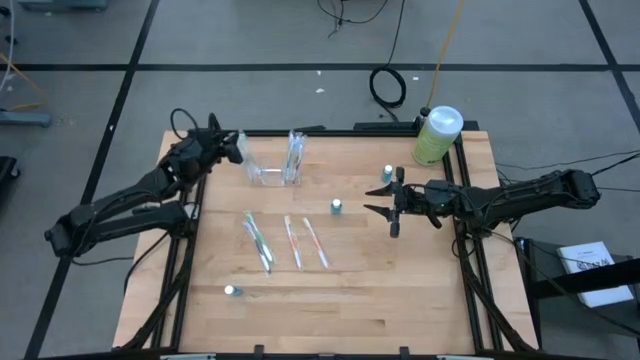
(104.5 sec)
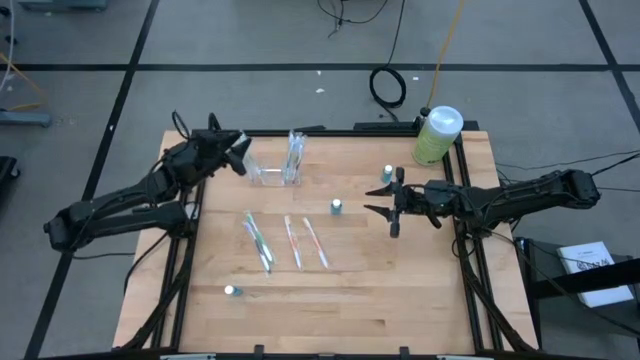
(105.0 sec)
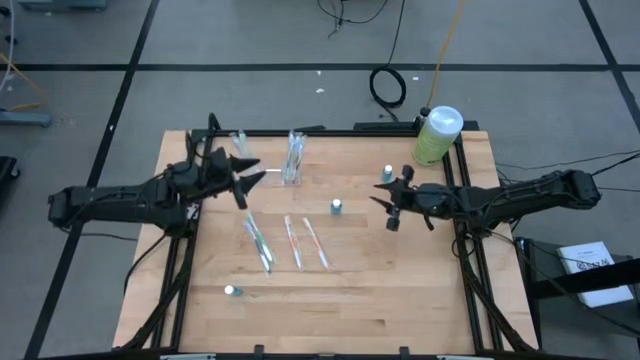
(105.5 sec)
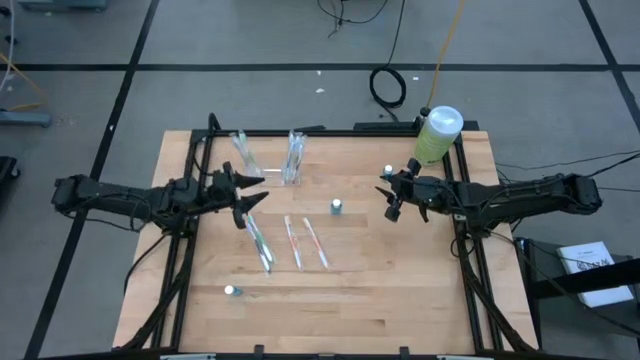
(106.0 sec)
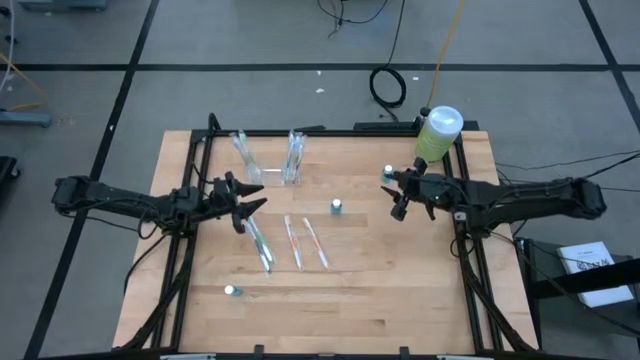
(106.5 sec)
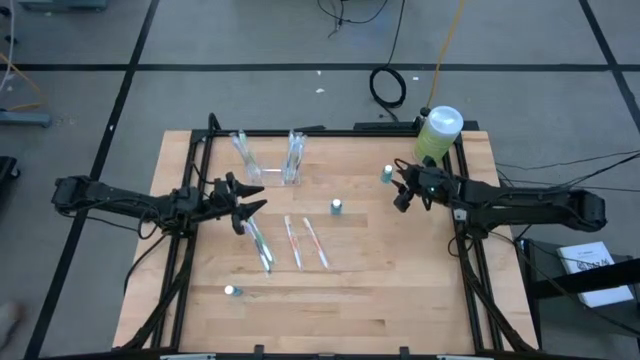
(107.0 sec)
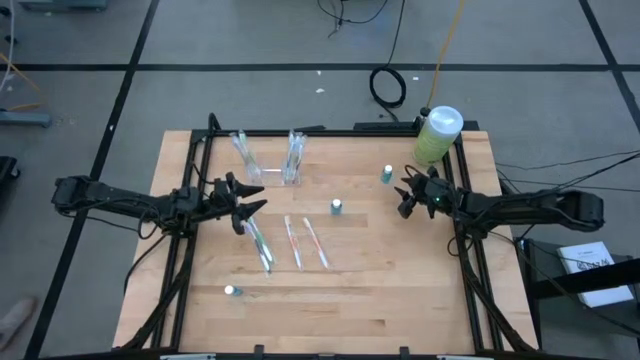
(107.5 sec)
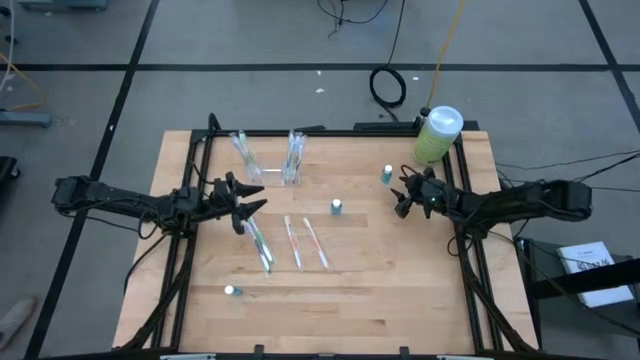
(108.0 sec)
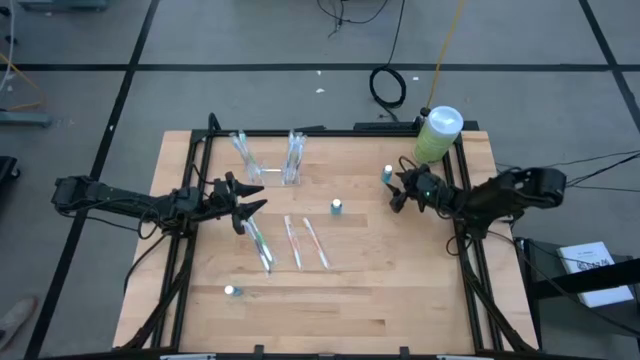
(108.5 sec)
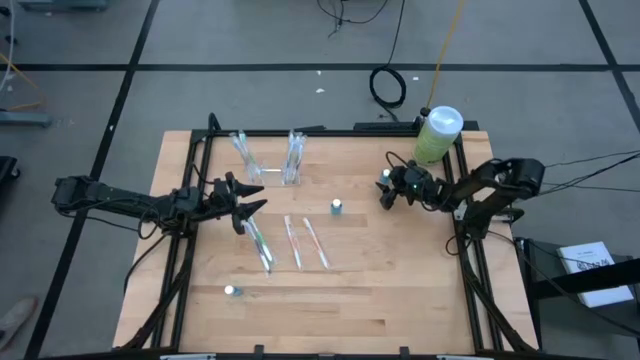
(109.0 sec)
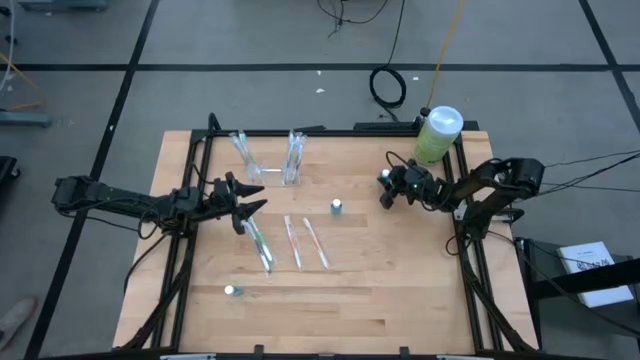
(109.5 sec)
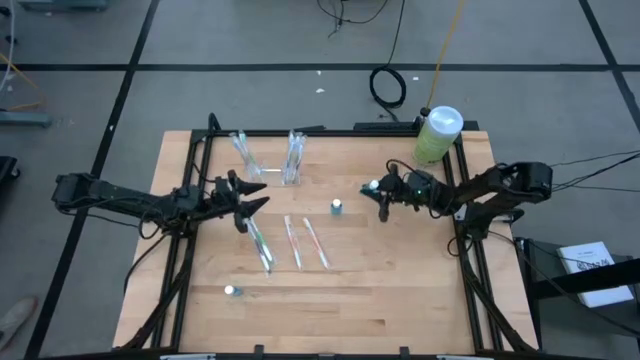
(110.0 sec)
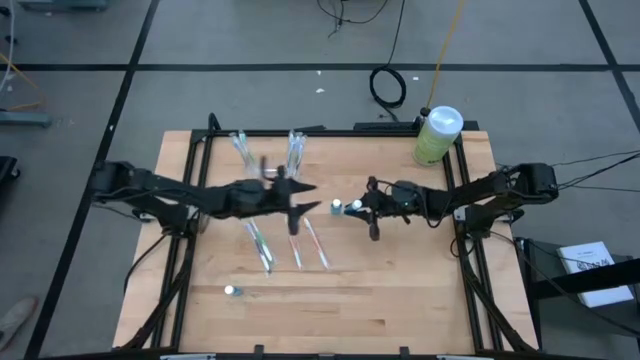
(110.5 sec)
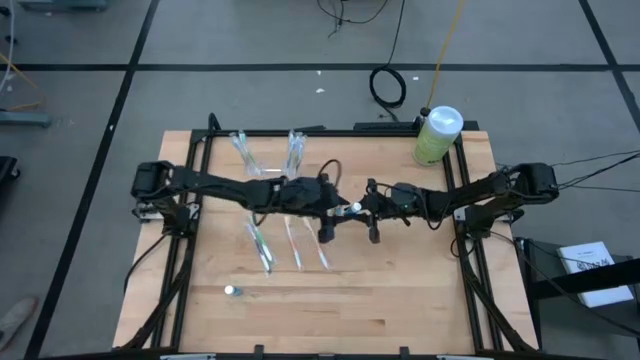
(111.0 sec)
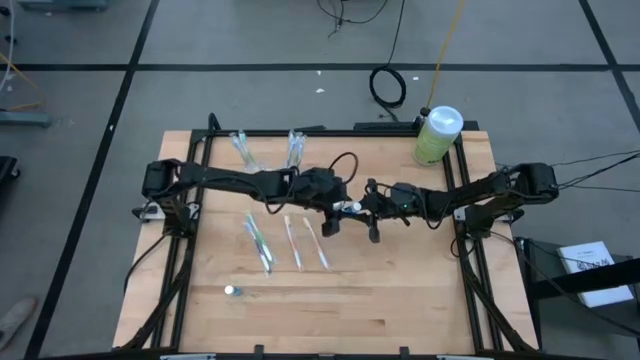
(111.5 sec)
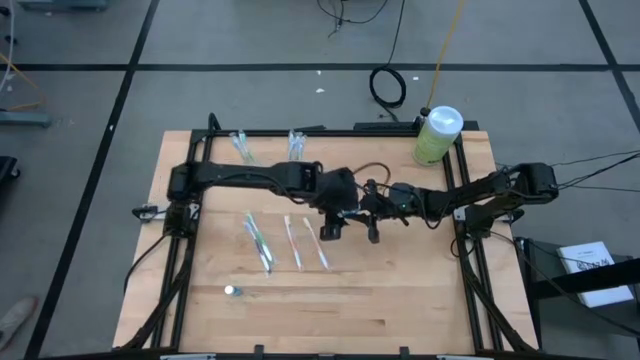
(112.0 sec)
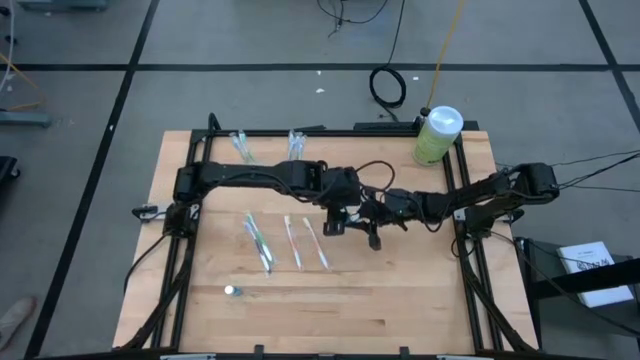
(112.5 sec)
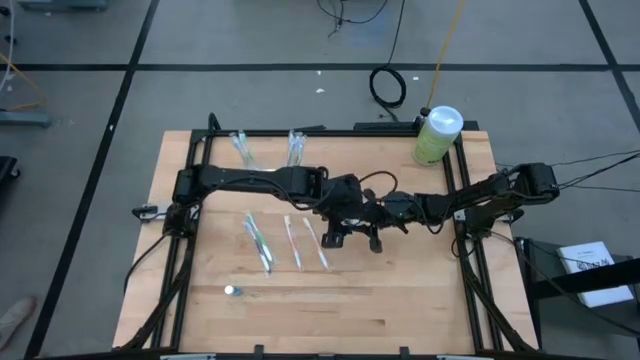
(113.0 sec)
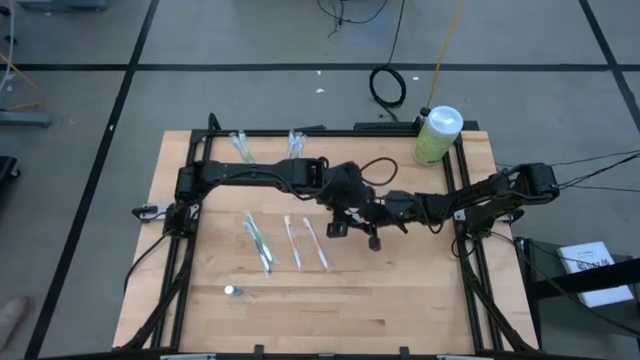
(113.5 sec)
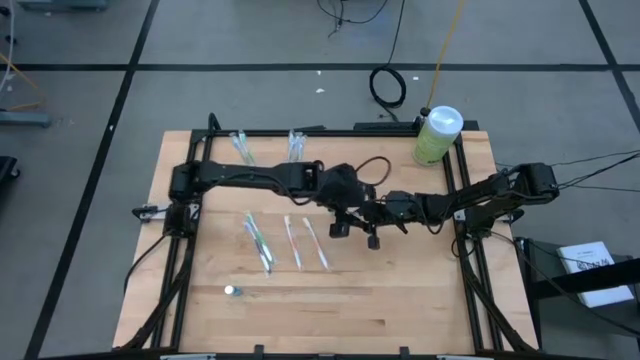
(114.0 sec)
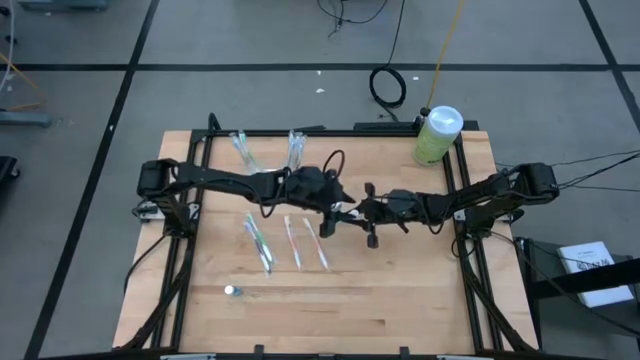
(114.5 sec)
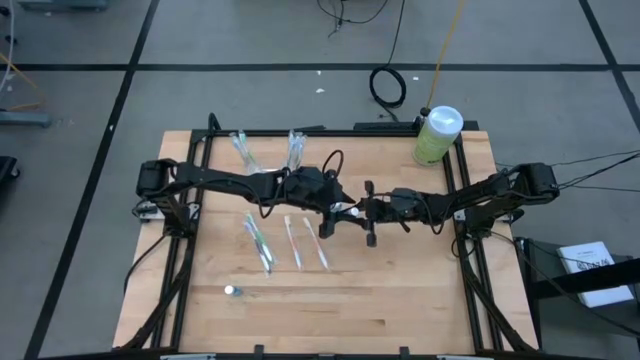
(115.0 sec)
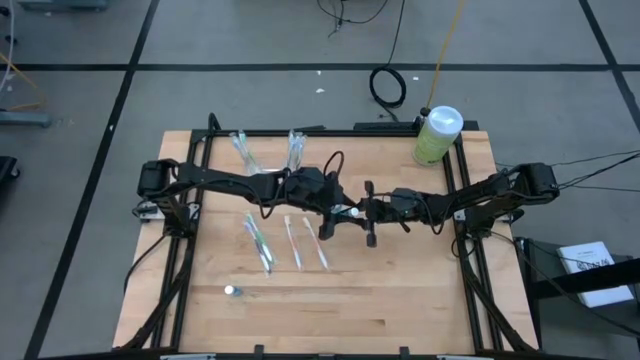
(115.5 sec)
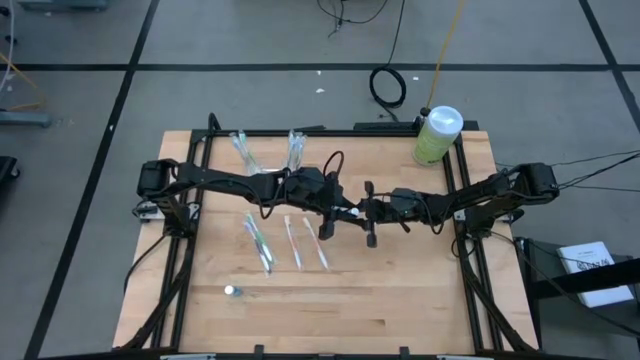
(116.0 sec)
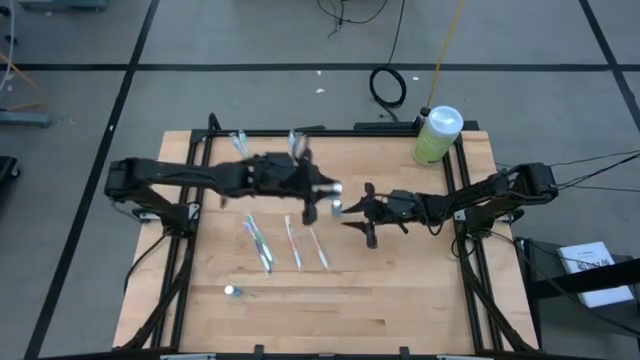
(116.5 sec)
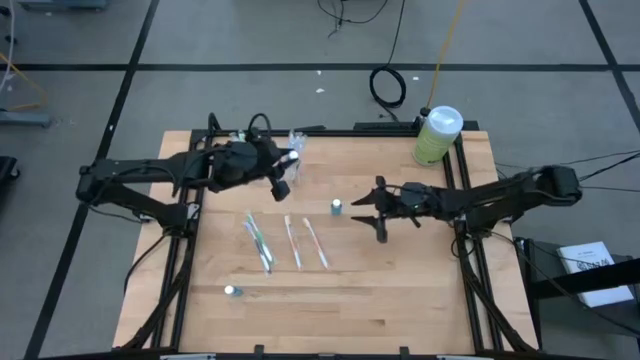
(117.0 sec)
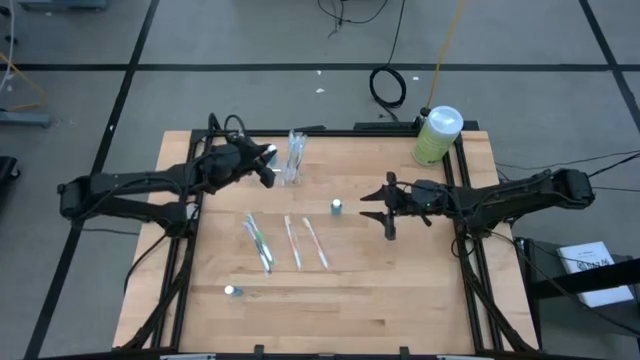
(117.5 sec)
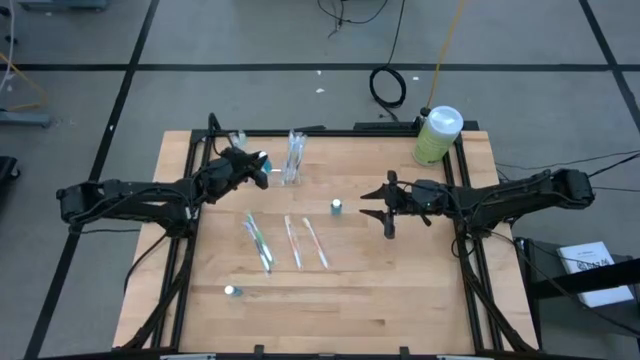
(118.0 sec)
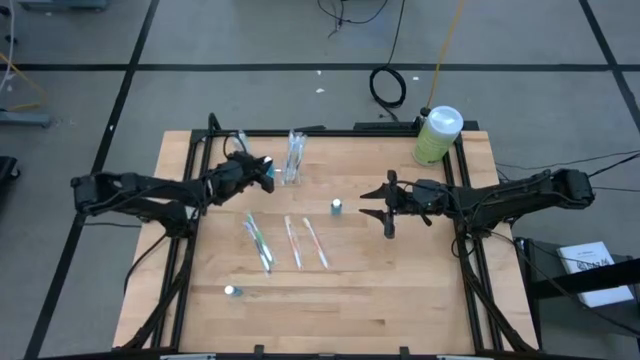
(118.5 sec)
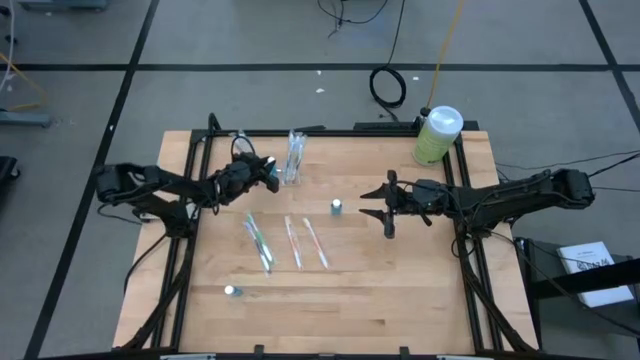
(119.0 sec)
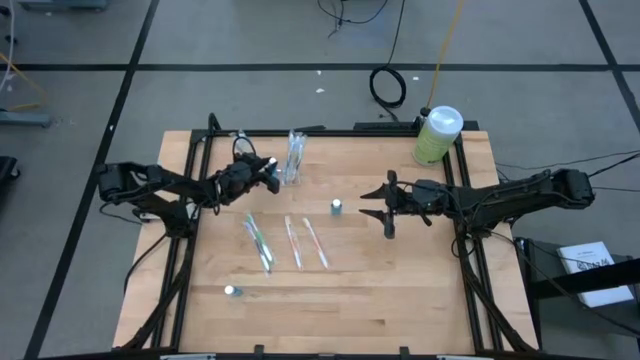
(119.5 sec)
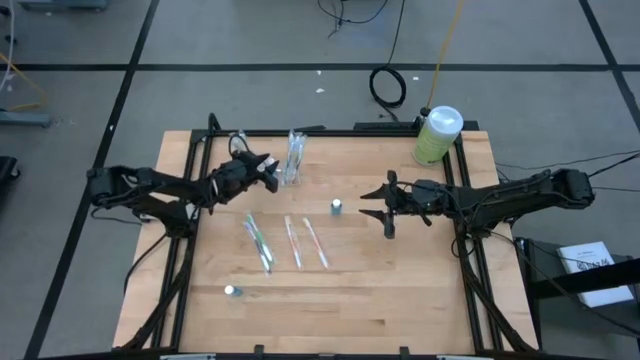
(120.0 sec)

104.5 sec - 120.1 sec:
Task: Pick & Place toothbrushing station
Put the blue mouthwash into the transparent organizer

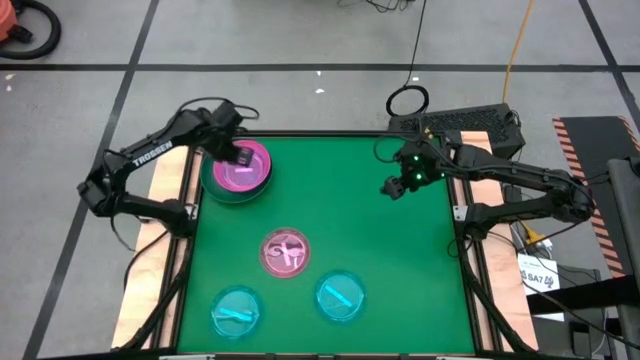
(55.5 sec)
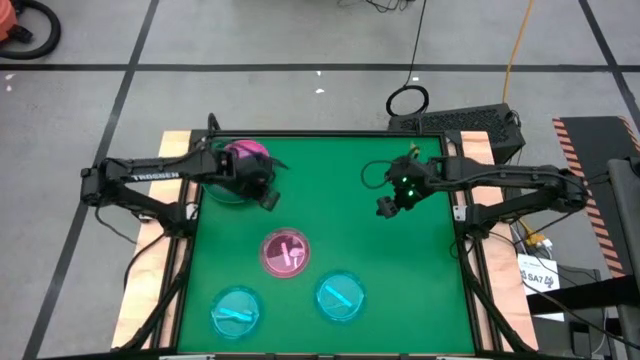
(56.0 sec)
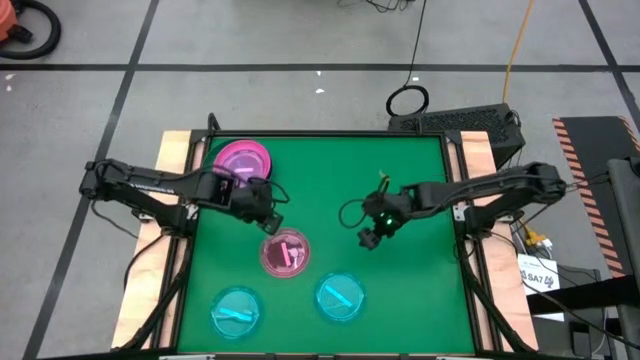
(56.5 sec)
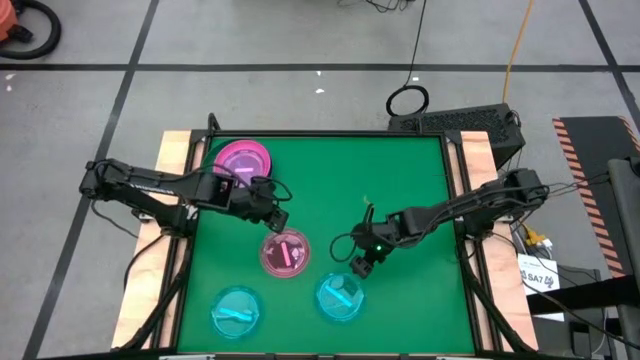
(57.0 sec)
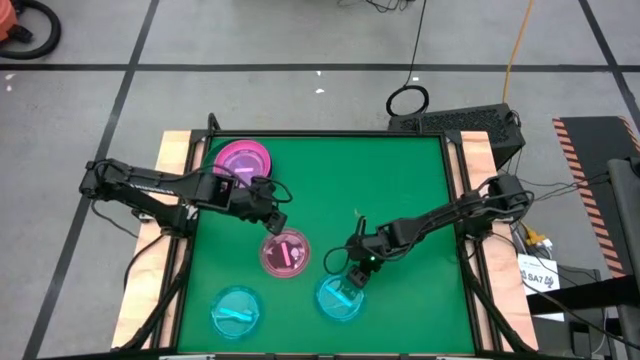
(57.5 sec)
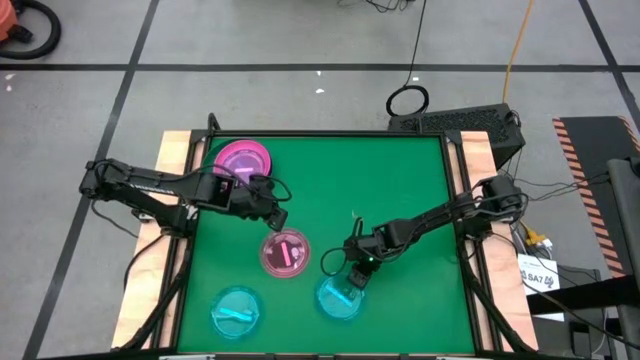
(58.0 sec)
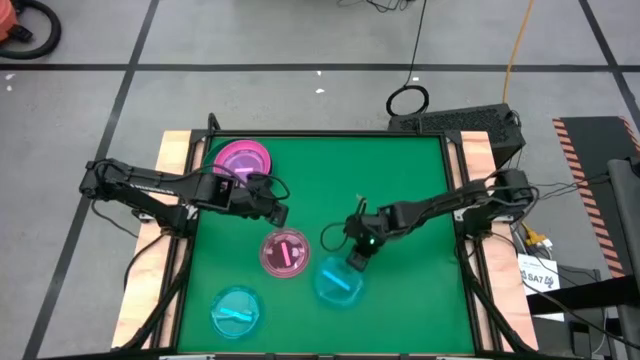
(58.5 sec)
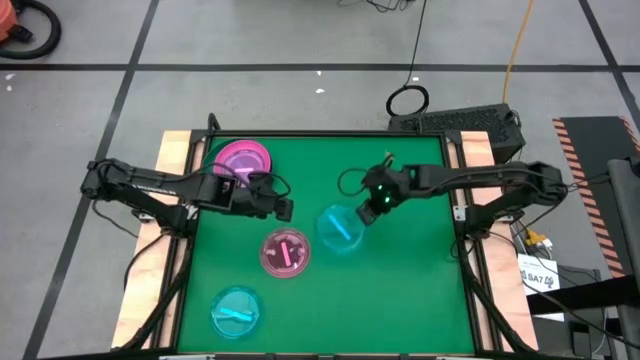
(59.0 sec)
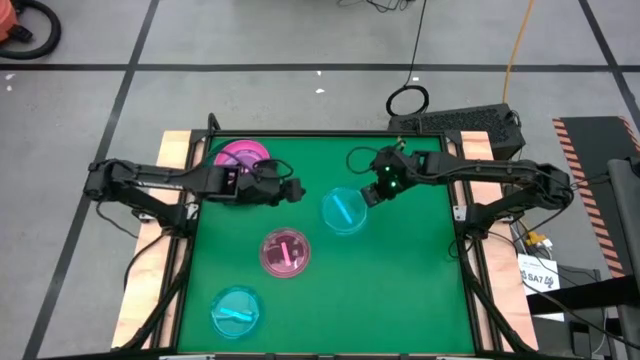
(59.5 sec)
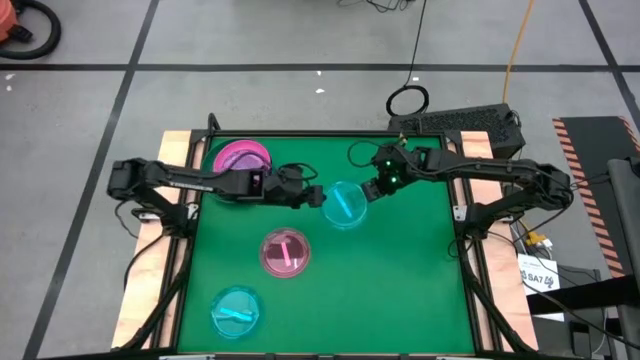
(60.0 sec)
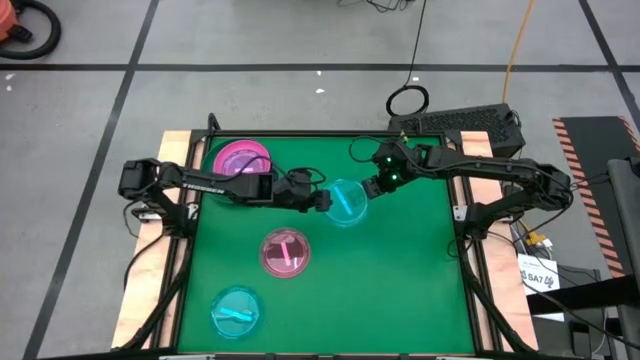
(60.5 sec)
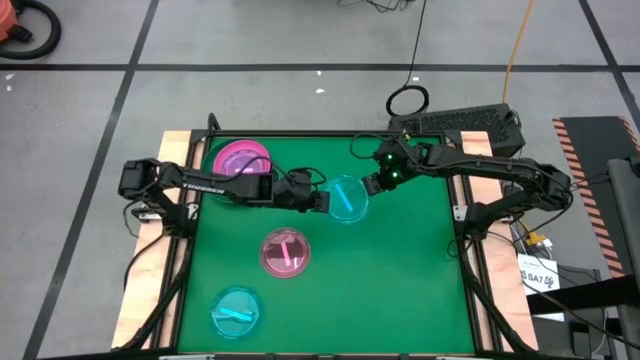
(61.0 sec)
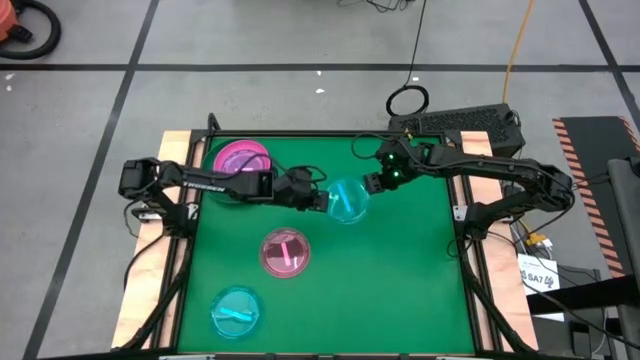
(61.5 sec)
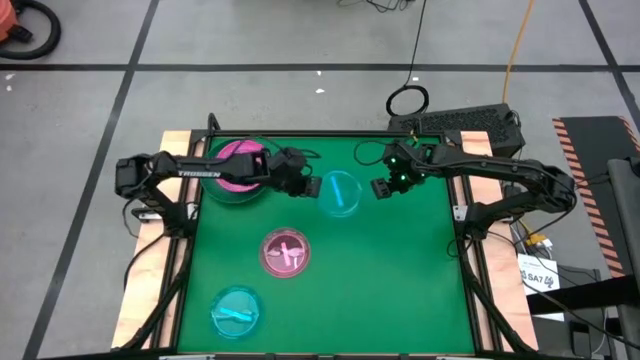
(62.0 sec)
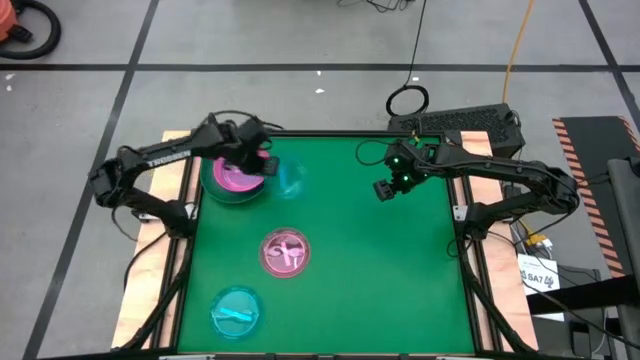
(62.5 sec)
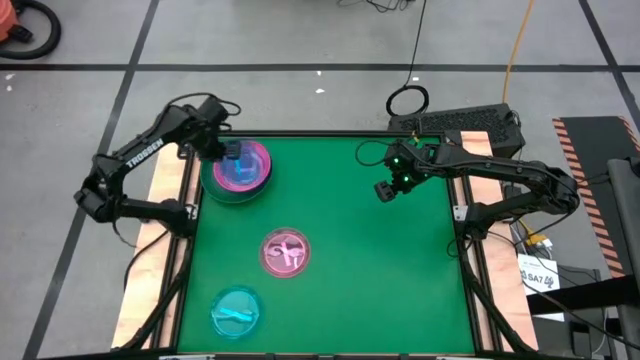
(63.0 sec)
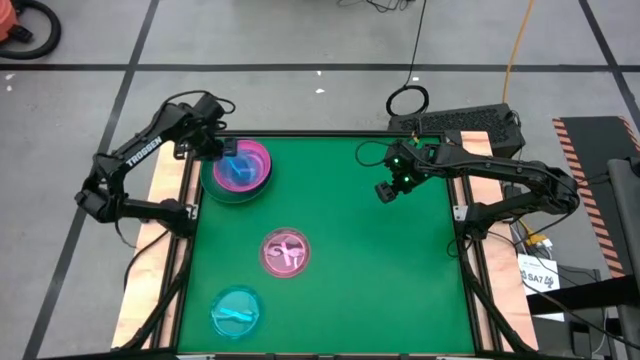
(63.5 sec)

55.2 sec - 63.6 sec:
Task: Stack plastic plates
Stack the right blue plate on top of the light pink plate
